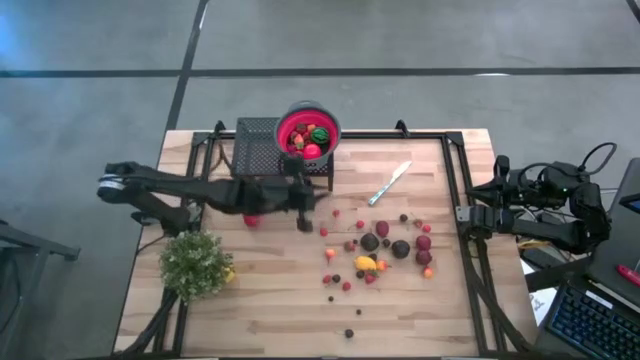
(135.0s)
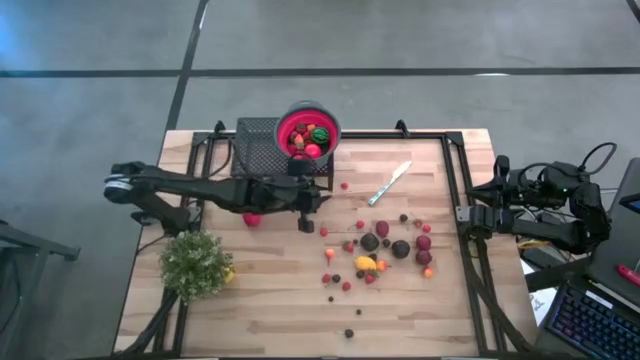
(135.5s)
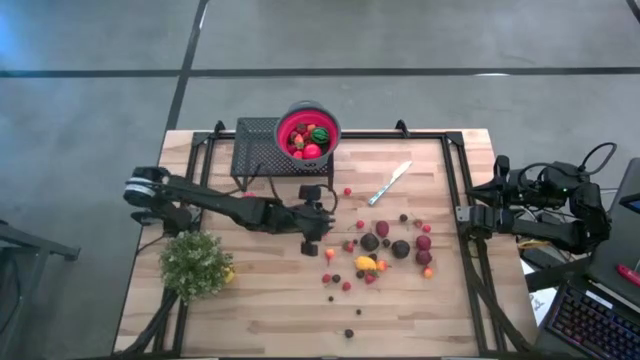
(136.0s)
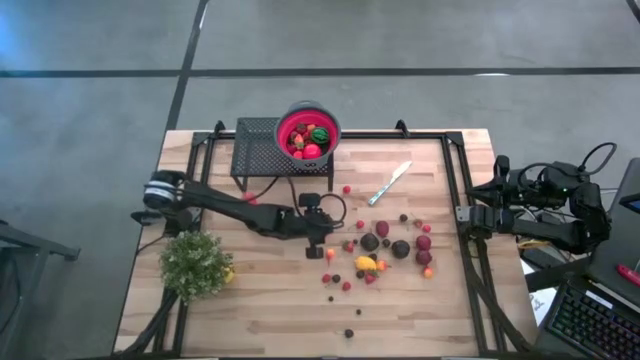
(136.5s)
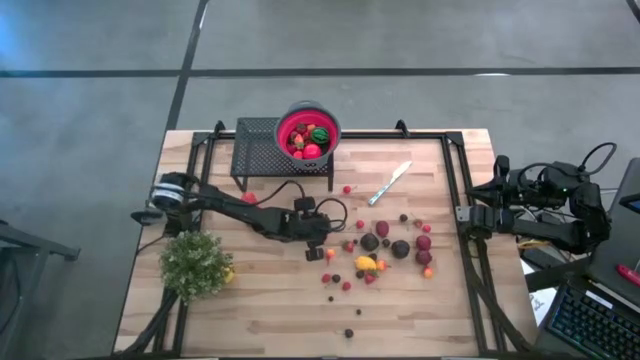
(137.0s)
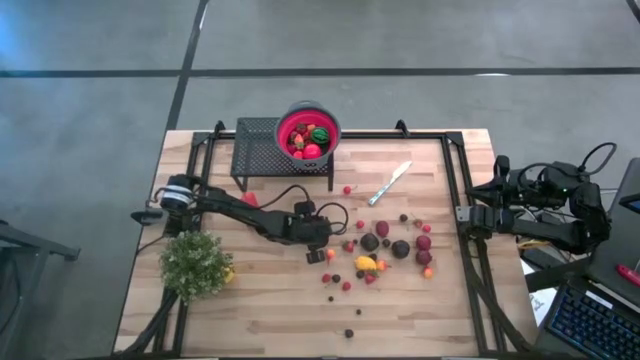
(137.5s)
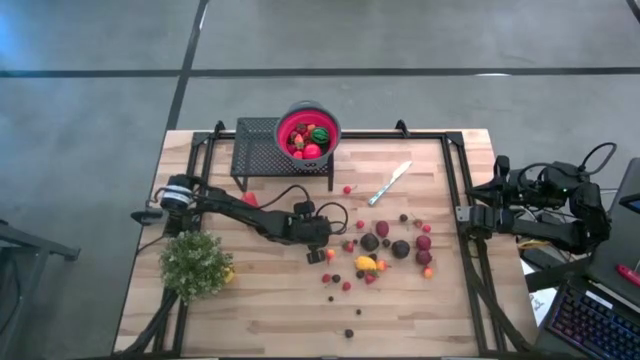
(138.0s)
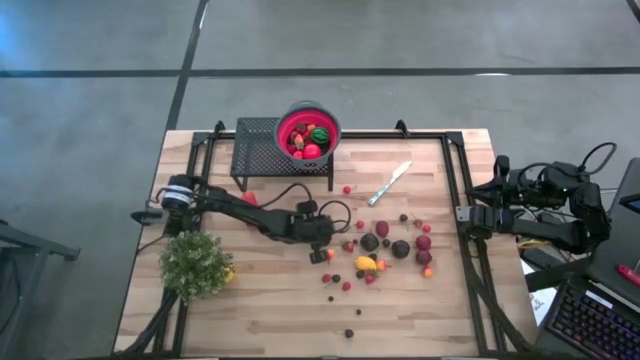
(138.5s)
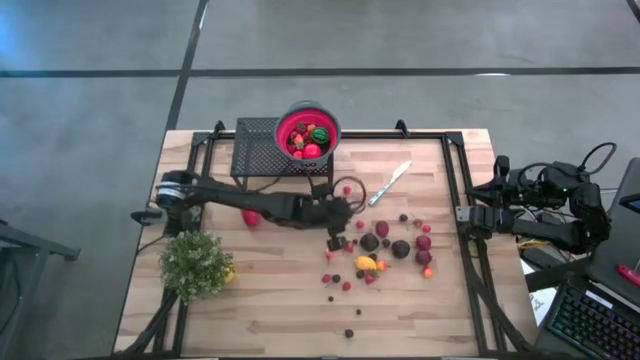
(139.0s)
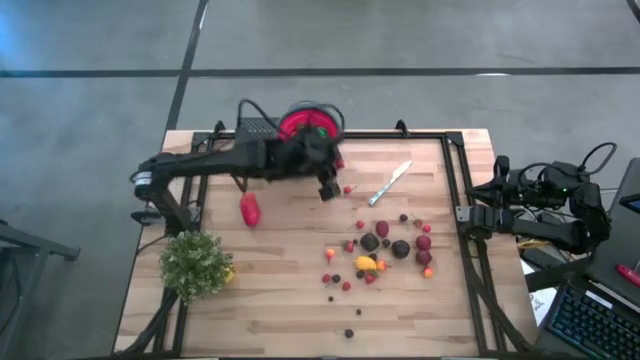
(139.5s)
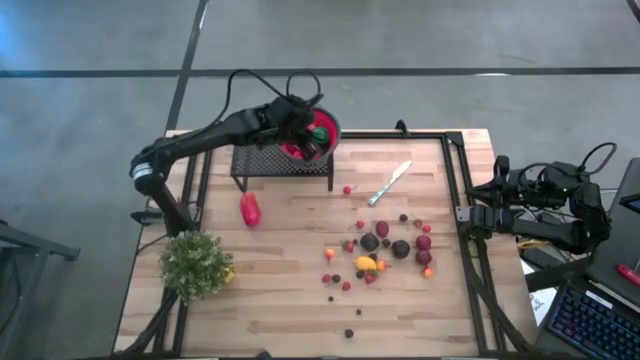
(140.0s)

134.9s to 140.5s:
Task: Pick & Place Fruit
Put the red cherry into the red gray strainer bowl on the shelf

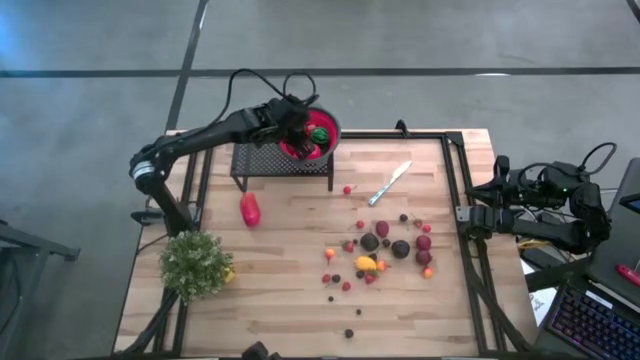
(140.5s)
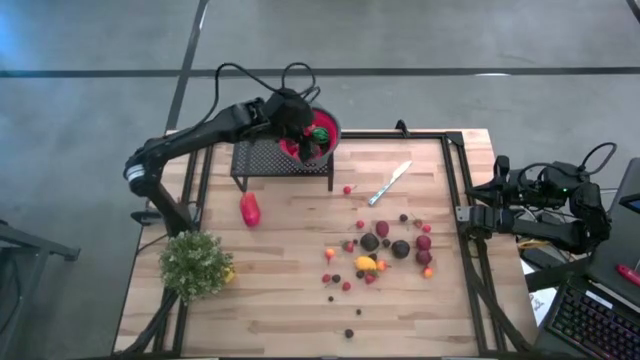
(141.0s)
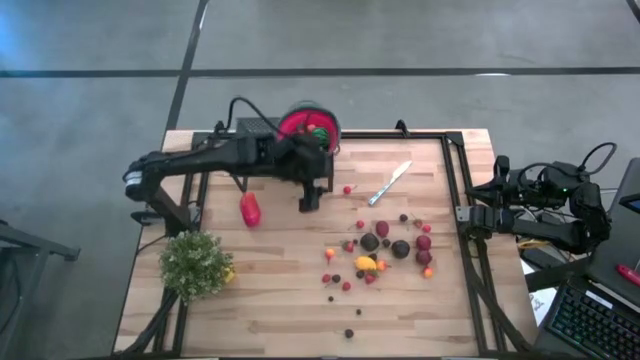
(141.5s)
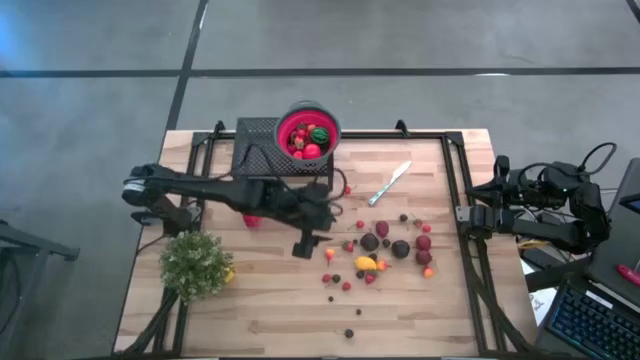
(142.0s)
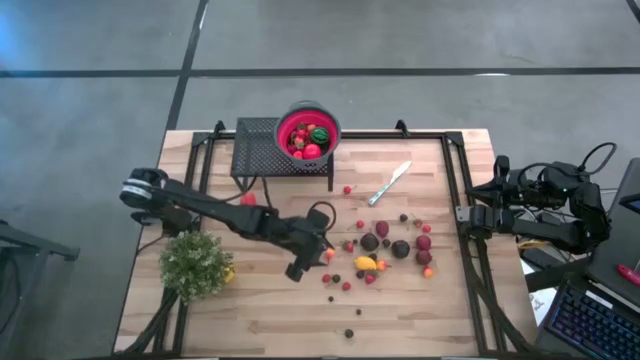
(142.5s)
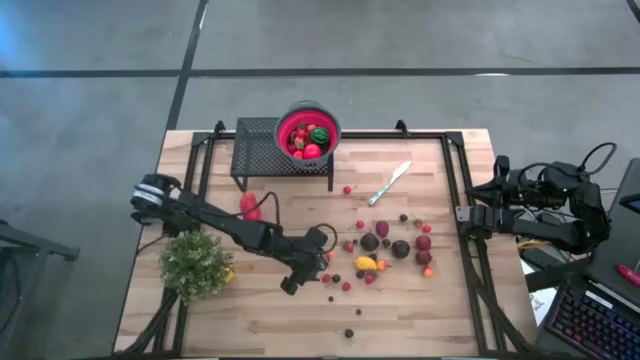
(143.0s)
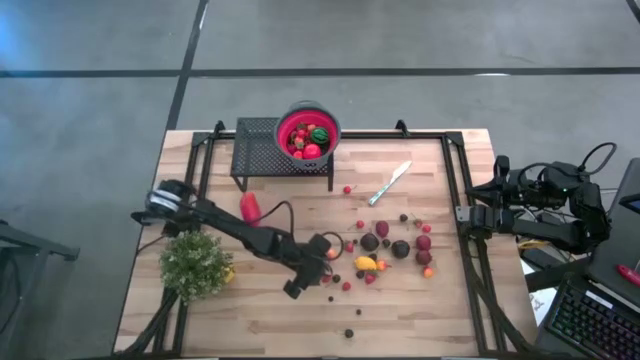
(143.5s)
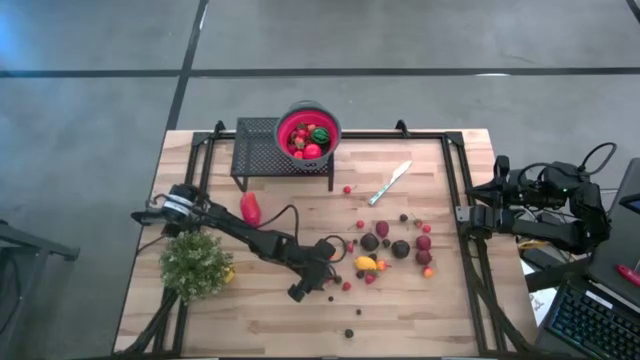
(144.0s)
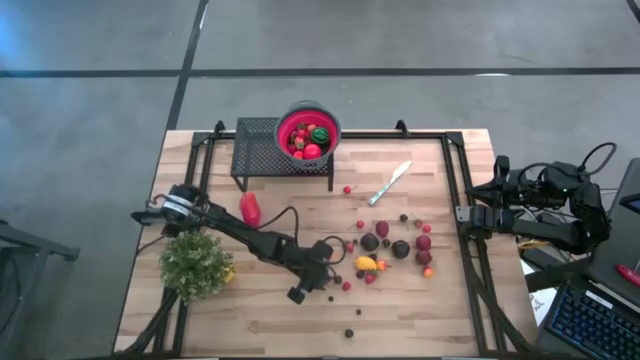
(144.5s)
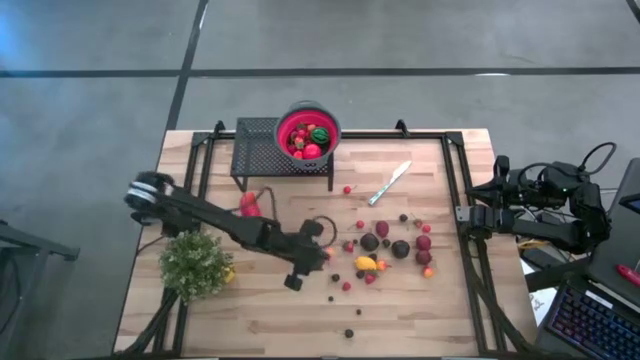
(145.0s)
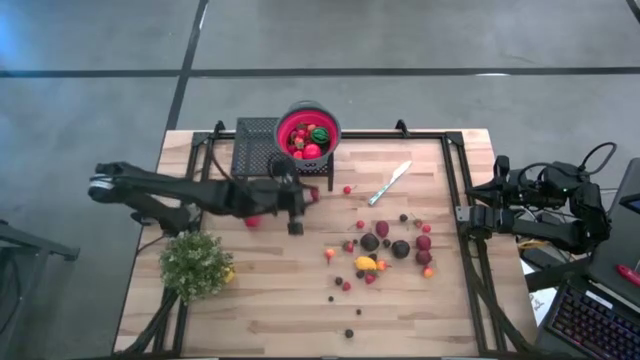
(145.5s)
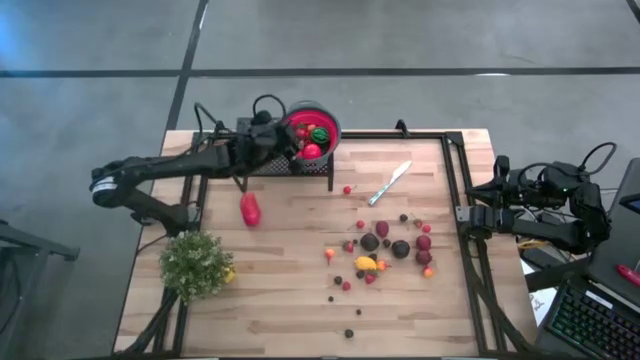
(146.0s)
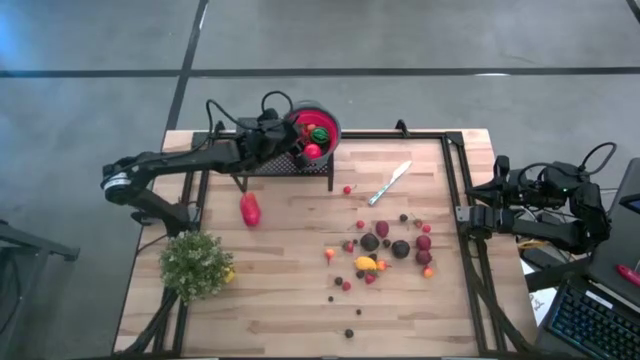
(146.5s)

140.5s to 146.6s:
Put the red raspberry into the red gray strainer bowl on the shelf

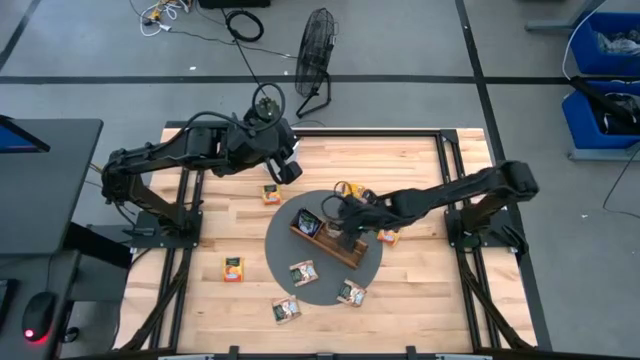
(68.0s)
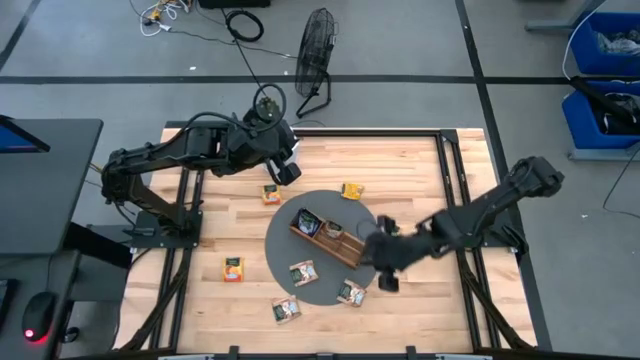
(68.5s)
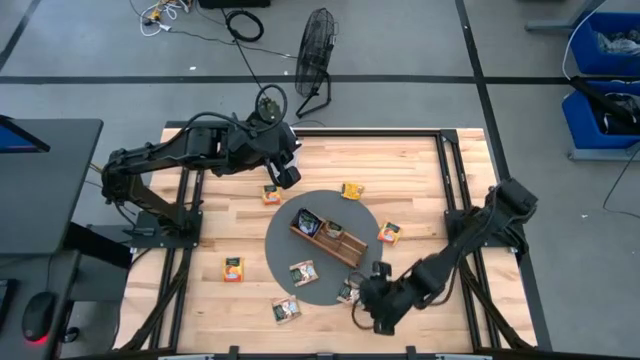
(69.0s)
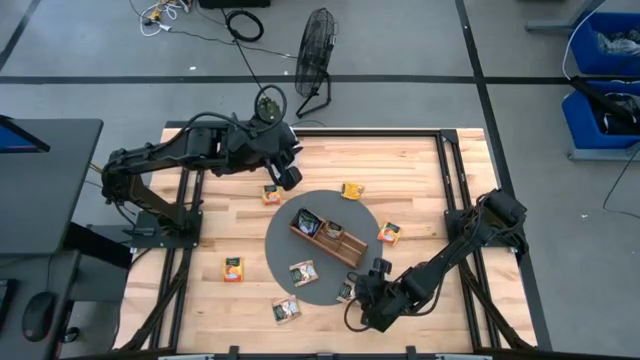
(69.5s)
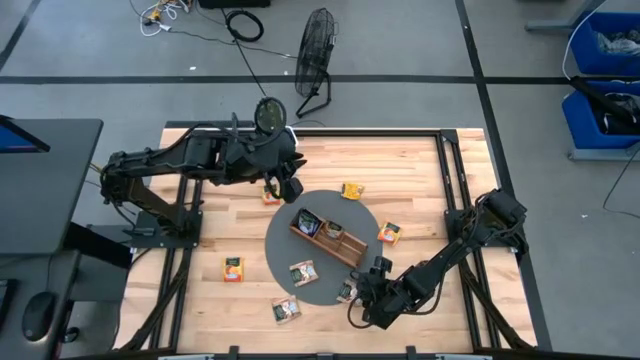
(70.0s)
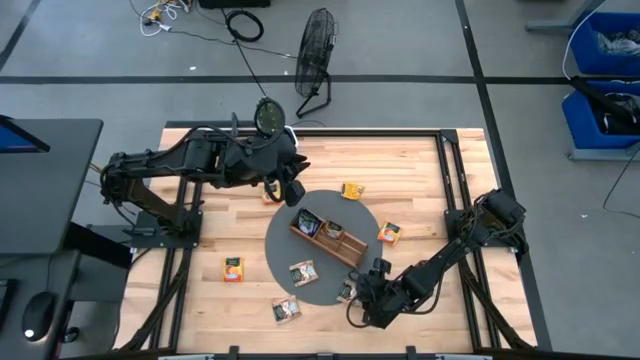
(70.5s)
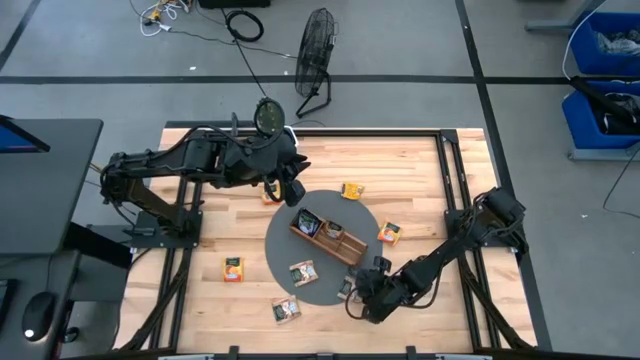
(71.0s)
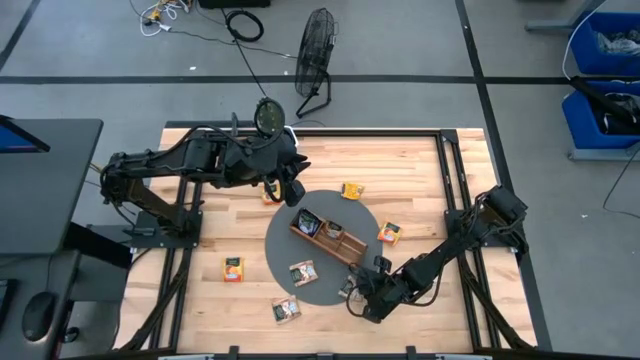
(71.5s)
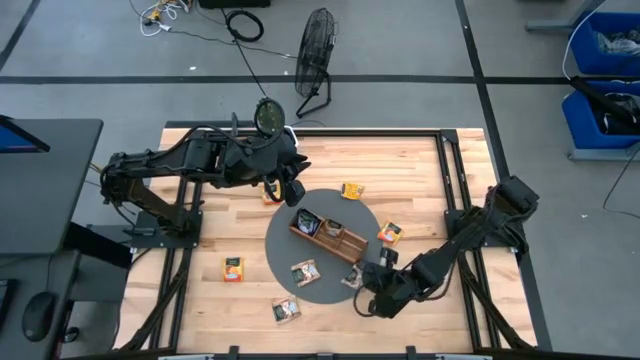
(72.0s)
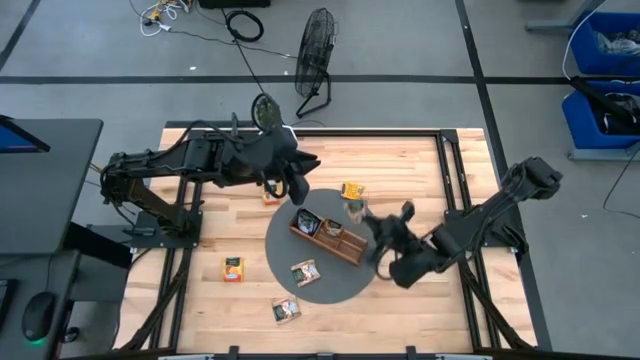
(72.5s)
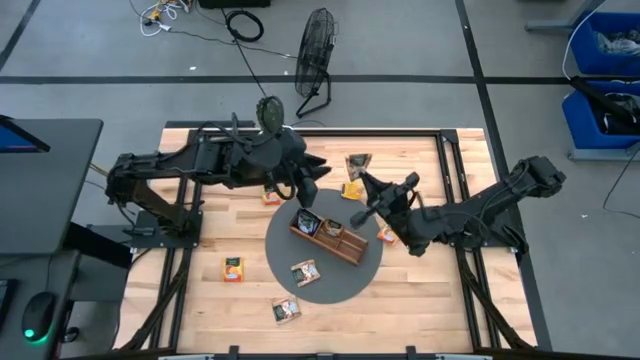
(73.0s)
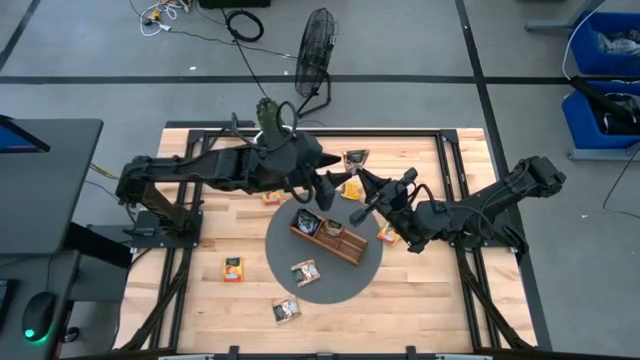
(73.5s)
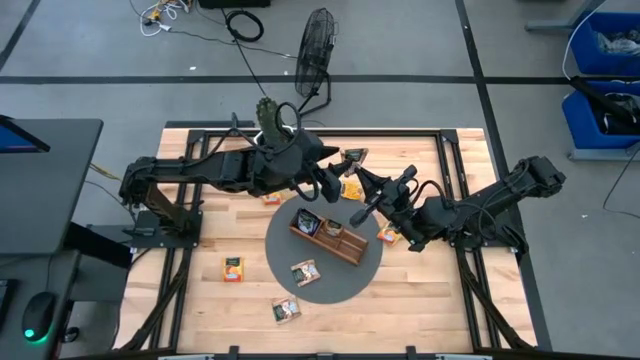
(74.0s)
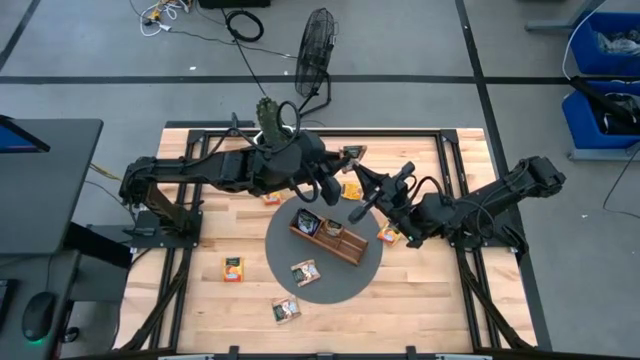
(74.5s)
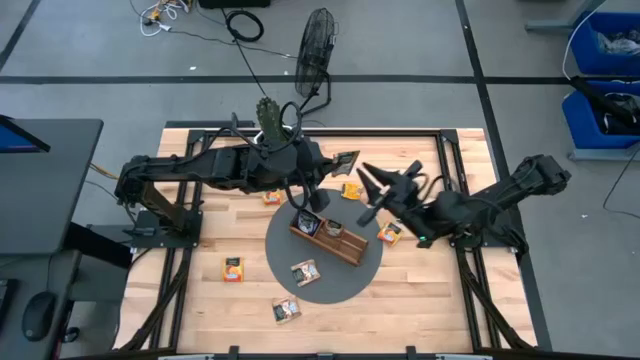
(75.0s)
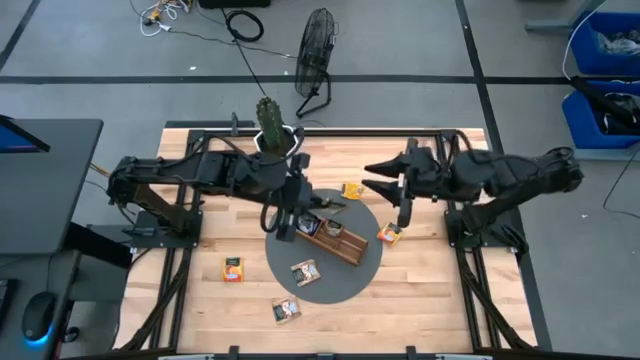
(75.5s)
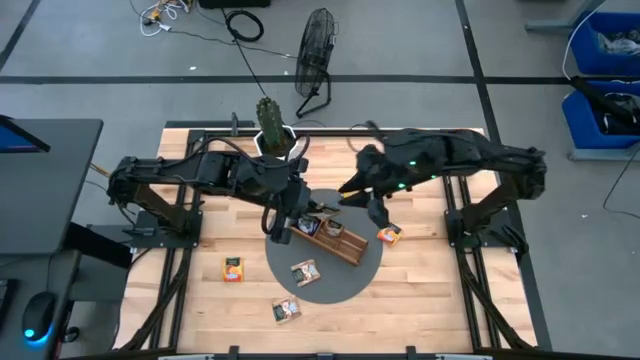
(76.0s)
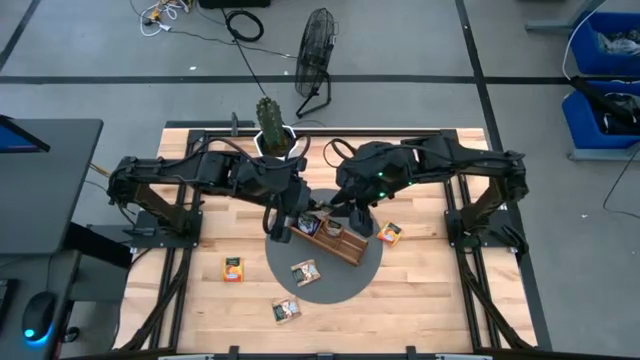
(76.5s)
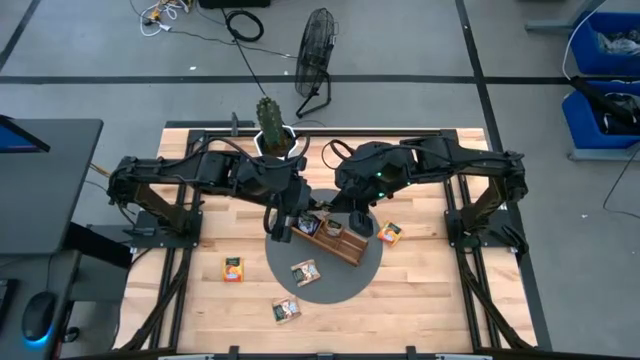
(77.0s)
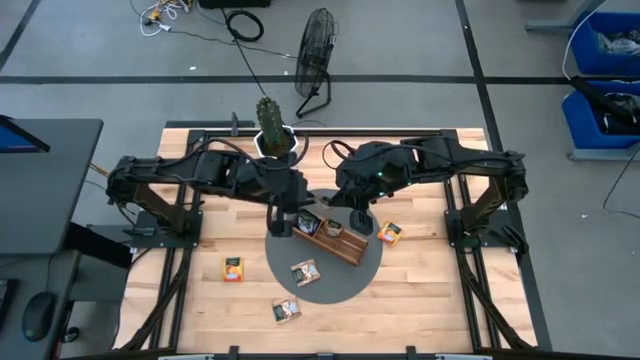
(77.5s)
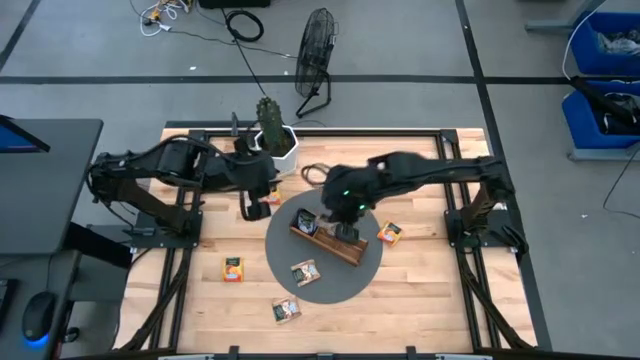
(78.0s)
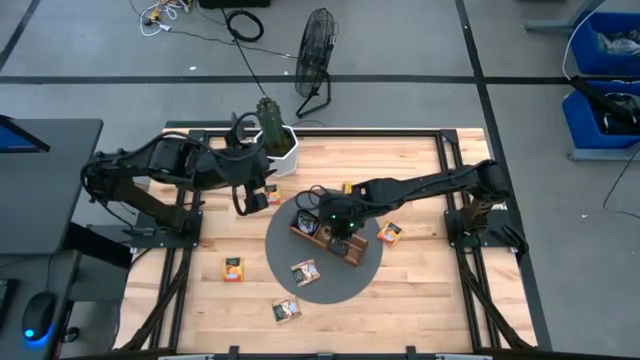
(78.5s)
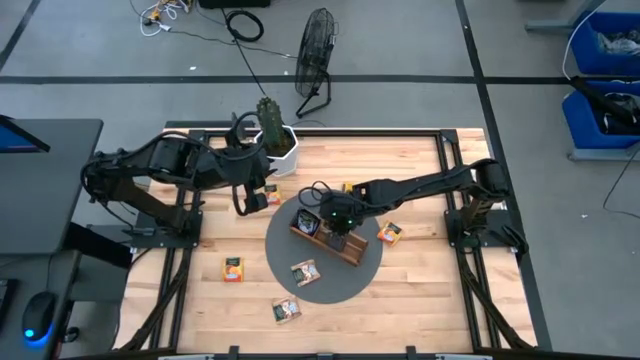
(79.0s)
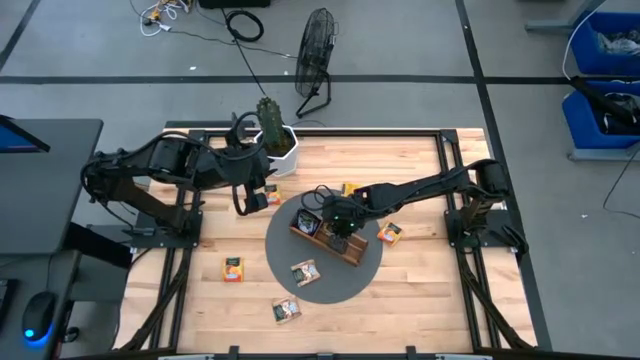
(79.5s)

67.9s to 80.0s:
Task: Pick & Place Tea
Put the brown tea bag into the middle section of the wooden organizer
